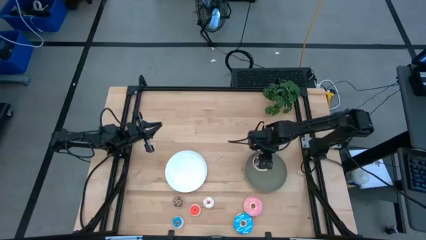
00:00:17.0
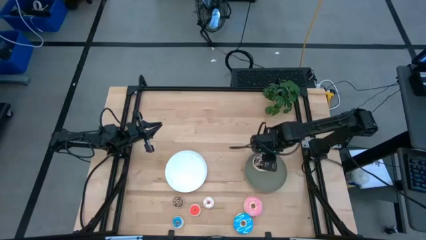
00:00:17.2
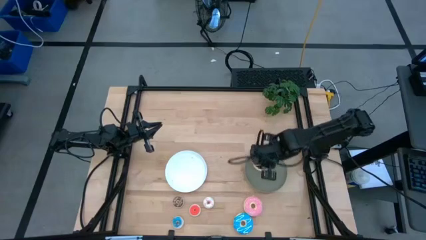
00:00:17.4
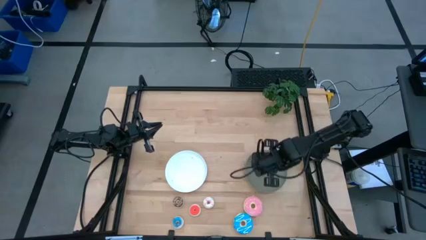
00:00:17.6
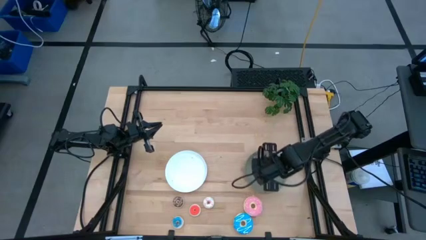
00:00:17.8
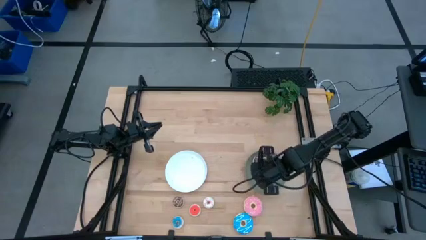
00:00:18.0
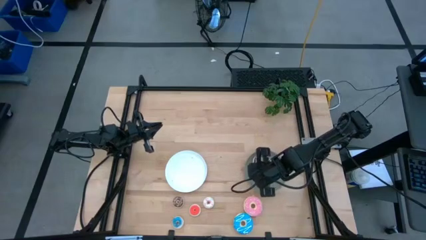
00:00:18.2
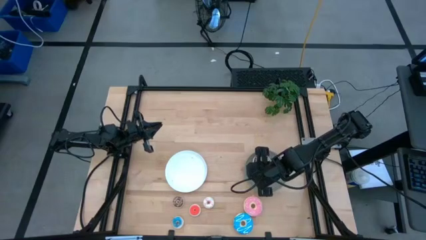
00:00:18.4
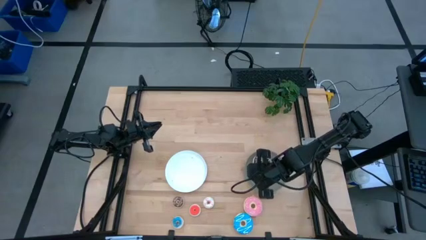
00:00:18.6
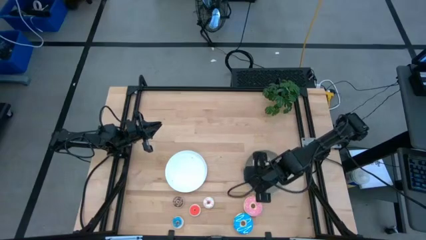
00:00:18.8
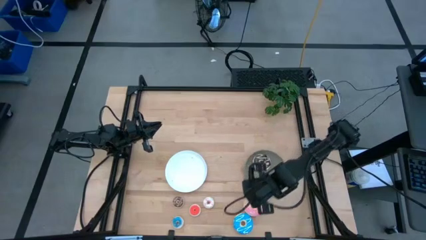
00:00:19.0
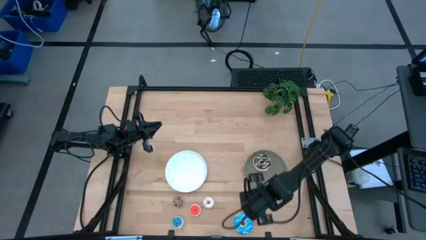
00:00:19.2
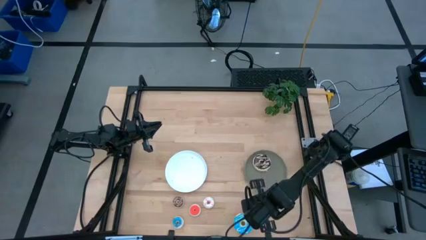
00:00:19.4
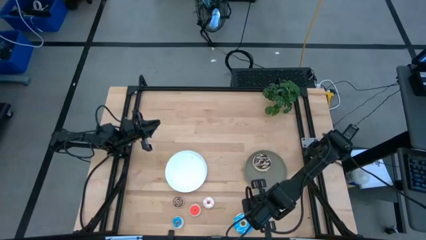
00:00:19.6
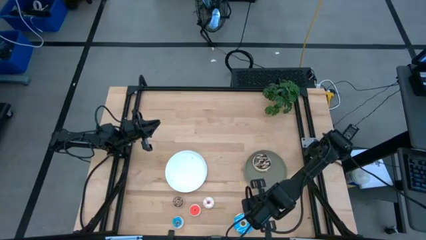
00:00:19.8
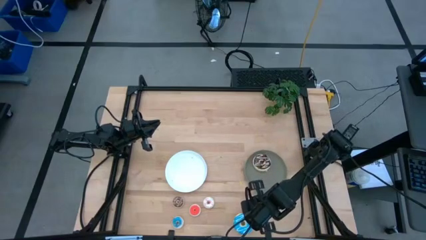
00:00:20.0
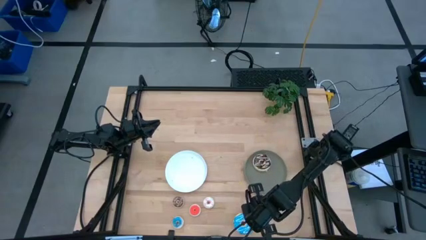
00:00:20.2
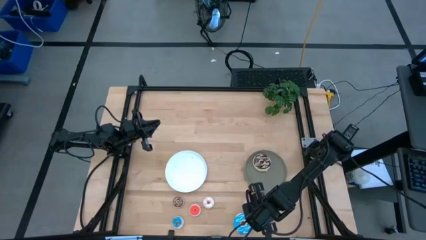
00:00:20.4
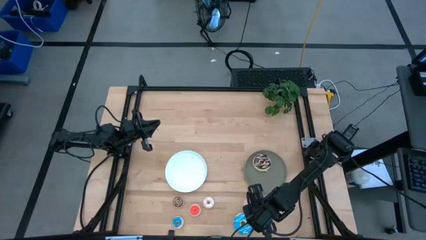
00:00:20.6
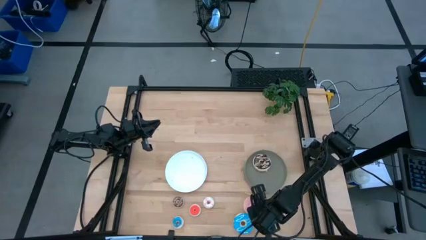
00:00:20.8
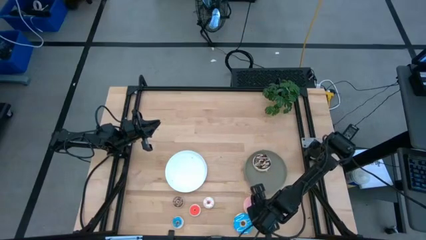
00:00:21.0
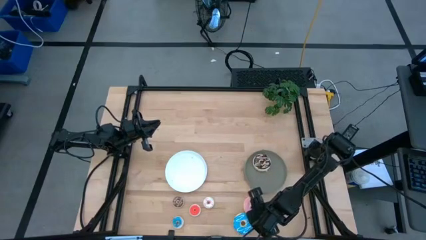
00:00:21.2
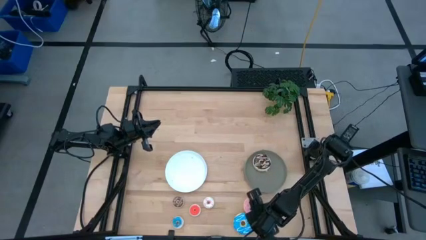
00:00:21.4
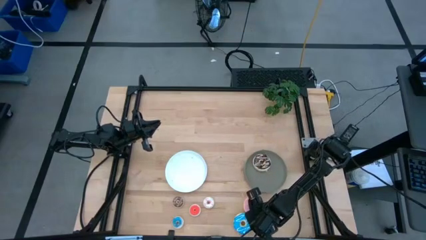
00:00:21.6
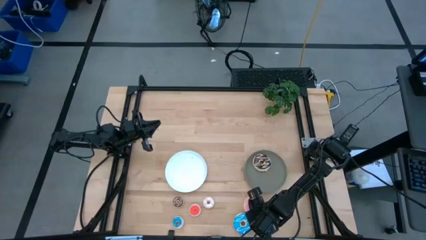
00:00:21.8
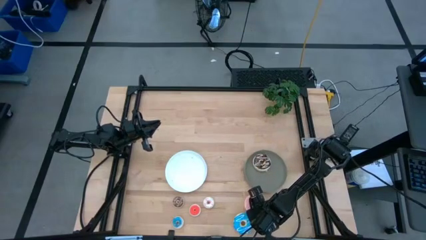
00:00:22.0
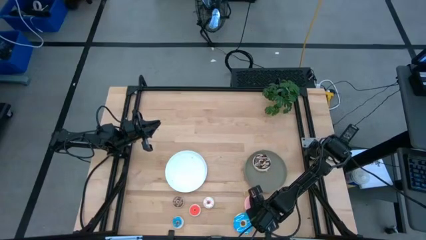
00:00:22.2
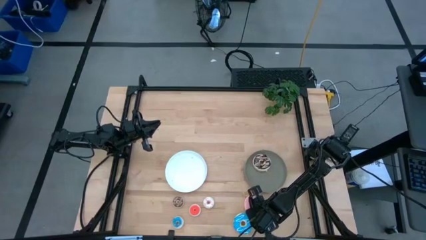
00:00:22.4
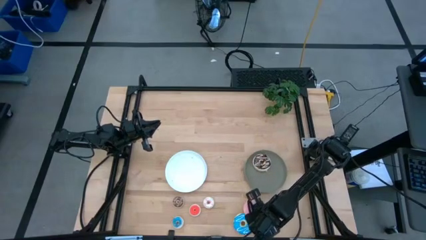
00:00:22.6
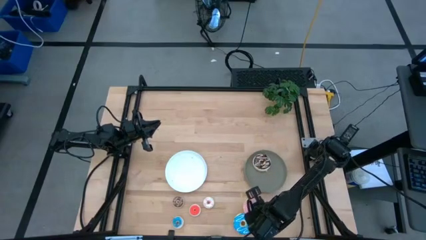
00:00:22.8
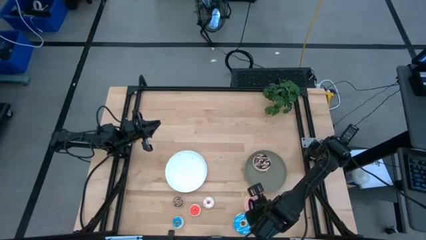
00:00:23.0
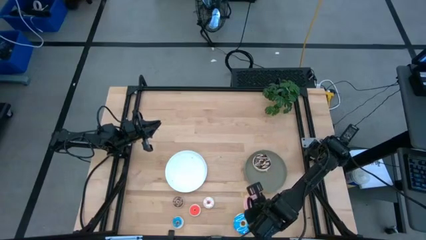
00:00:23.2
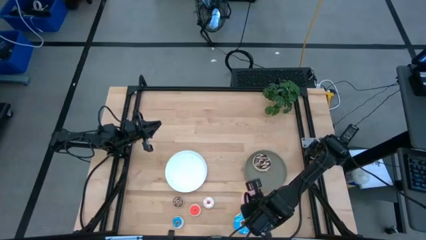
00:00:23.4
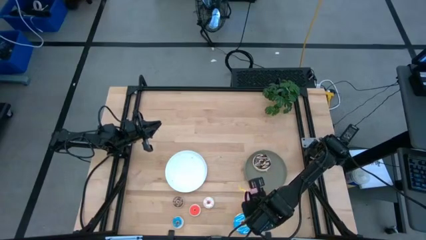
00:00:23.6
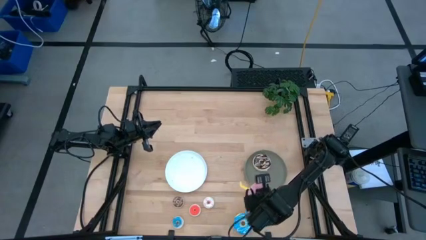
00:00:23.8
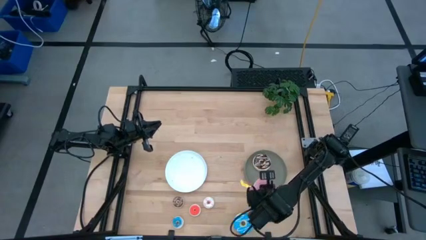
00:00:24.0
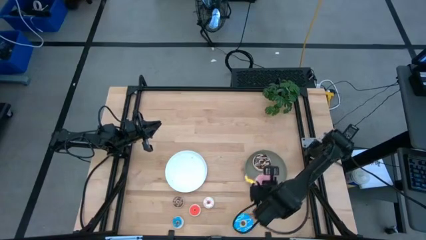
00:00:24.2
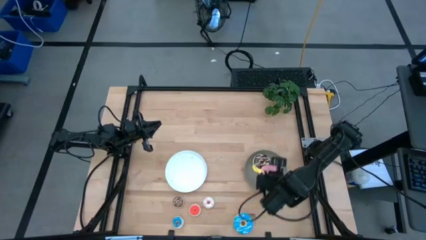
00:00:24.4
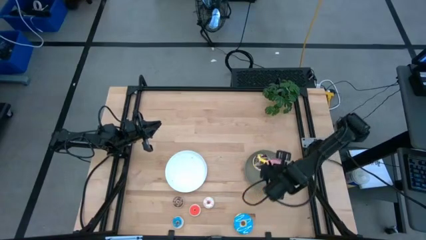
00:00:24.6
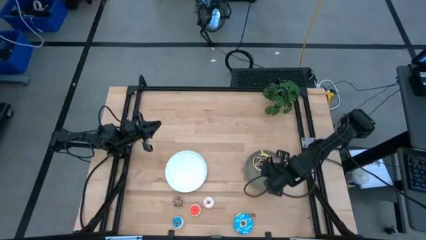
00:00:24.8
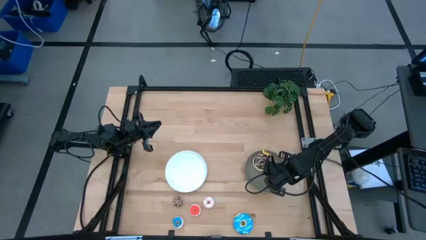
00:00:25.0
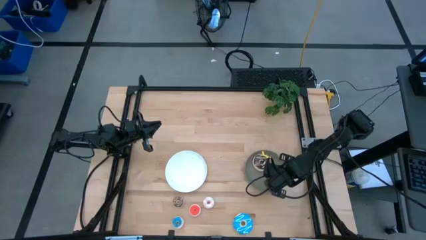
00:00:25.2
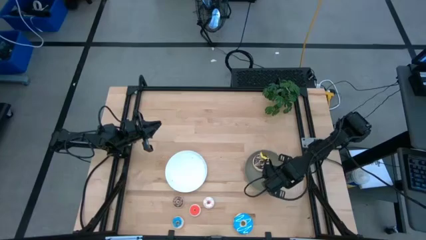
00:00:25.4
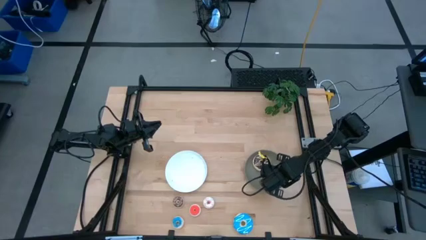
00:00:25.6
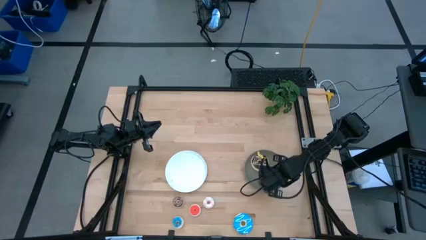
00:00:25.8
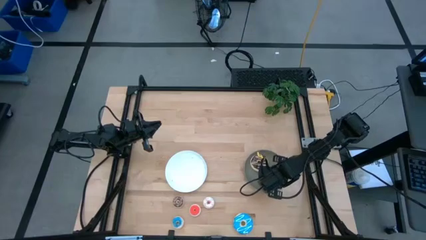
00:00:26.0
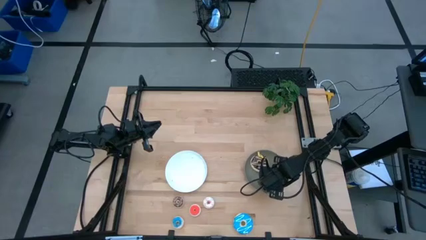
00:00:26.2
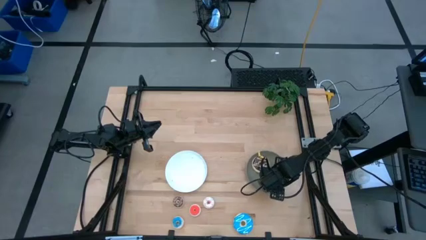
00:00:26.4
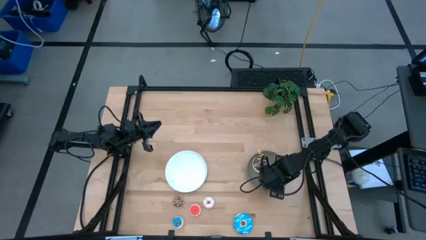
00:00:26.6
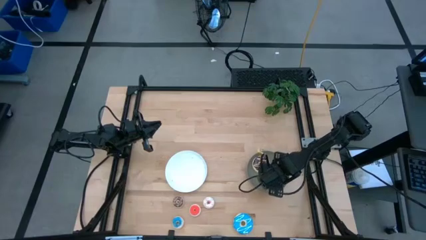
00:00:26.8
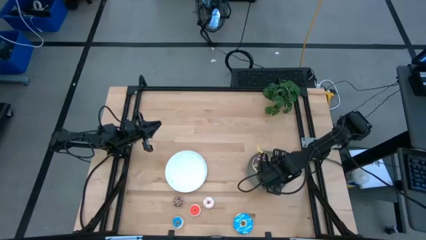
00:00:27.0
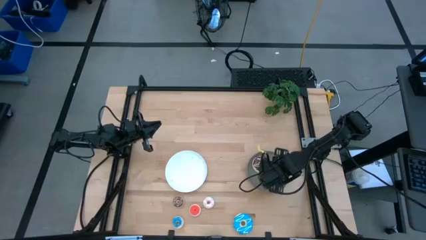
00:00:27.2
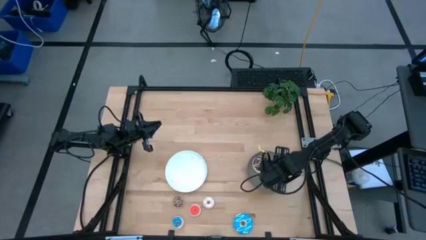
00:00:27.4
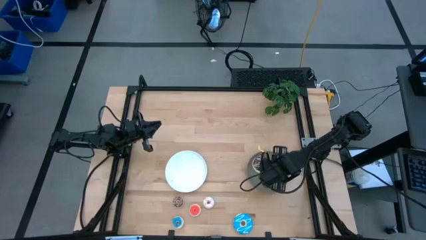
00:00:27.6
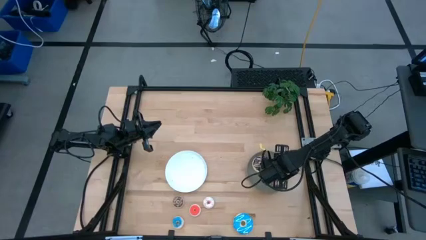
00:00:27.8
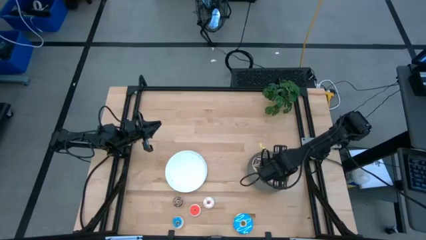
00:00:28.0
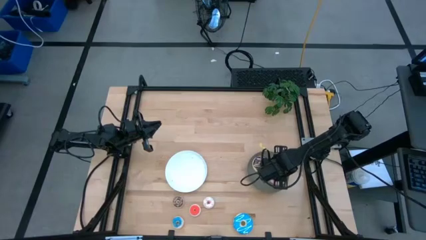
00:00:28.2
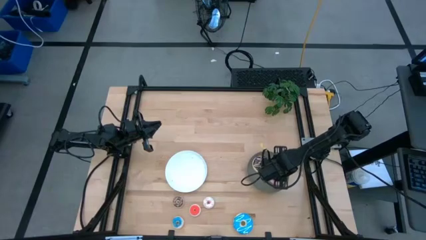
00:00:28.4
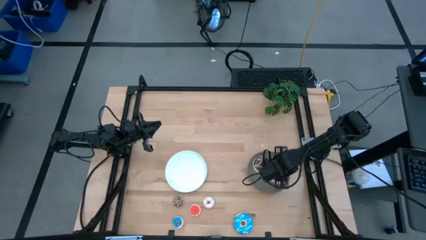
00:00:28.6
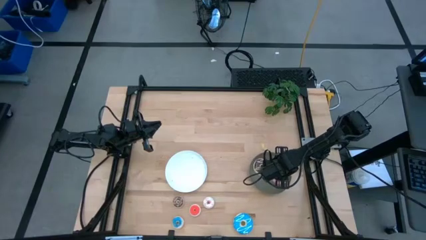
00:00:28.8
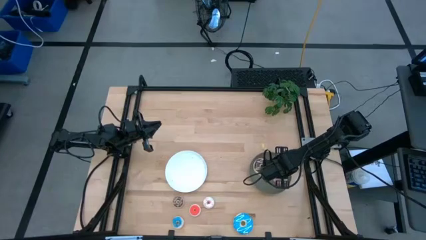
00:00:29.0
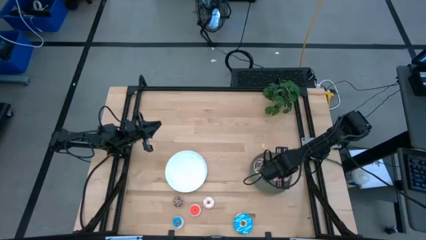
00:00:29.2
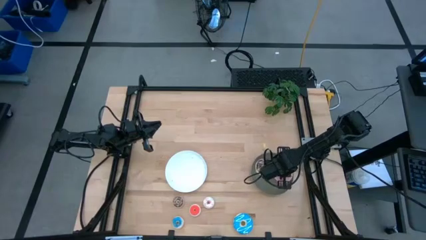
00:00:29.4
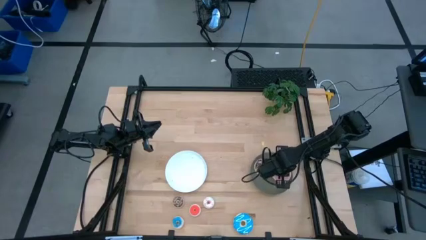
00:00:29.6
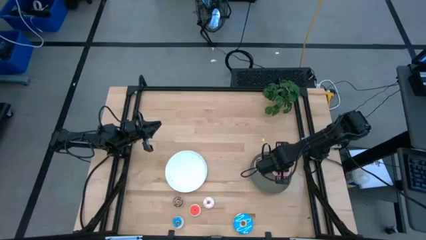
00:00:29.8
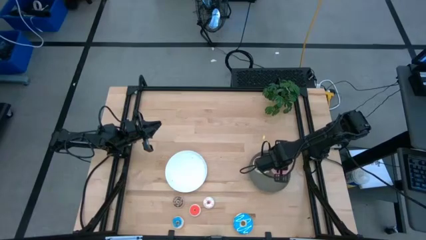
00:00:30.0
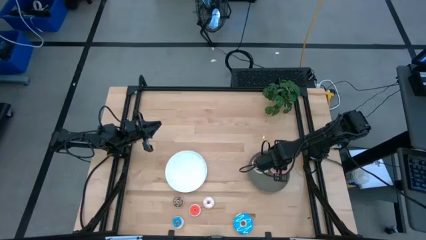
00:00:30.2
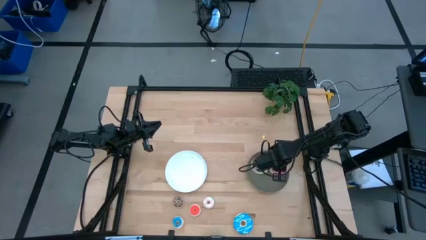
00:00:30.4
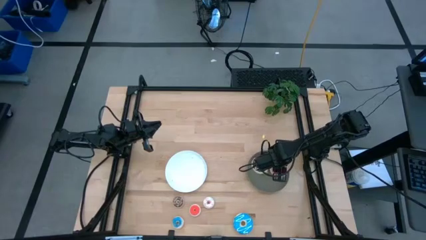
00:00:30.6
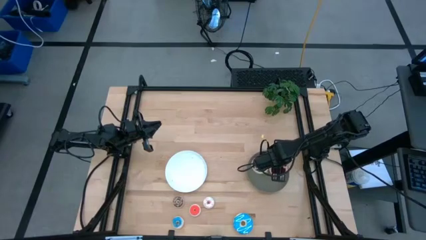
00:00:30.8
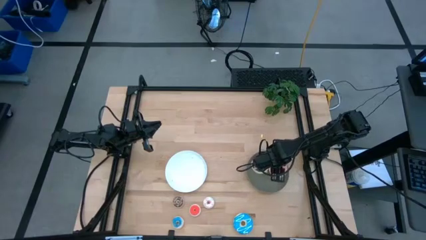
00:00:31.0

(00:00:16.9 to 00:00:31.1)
Task: Pick & Place donuts
Put the large pink donut on the gray plate

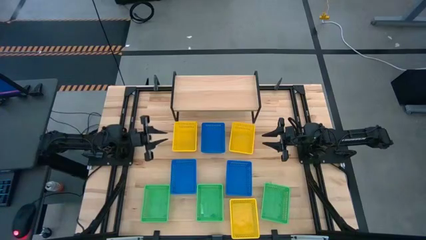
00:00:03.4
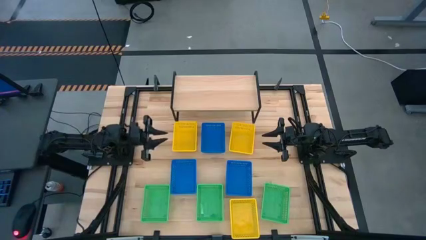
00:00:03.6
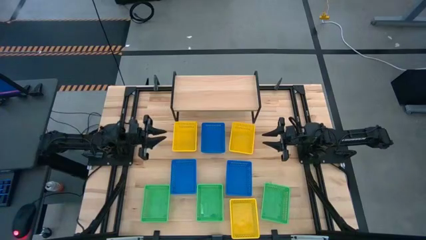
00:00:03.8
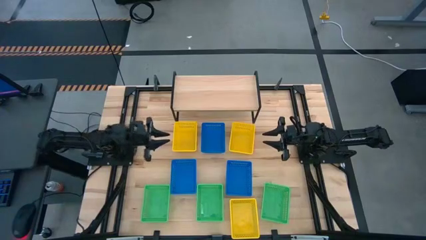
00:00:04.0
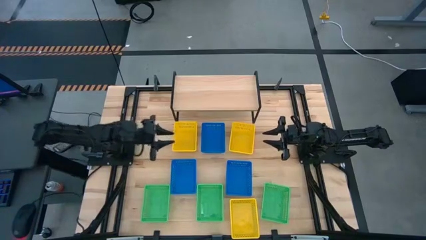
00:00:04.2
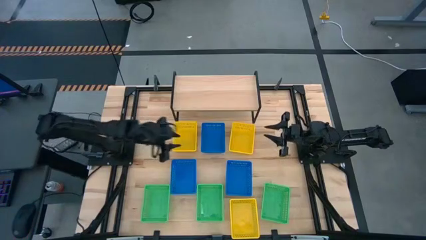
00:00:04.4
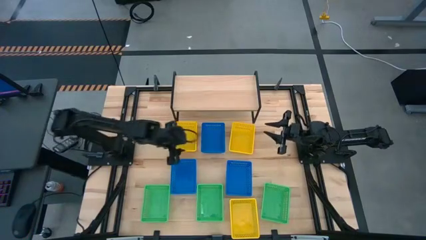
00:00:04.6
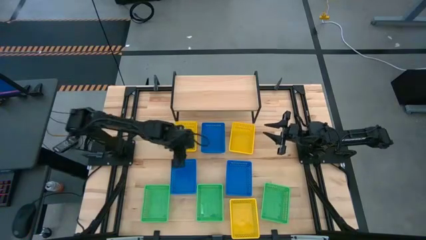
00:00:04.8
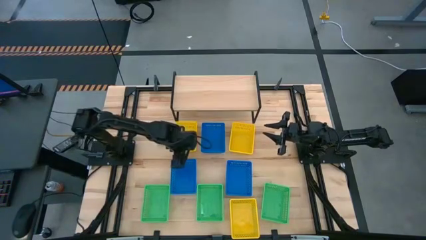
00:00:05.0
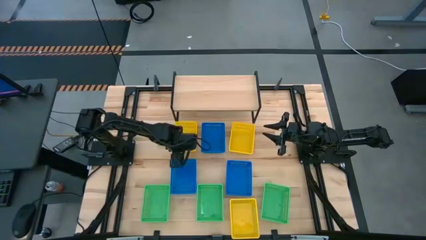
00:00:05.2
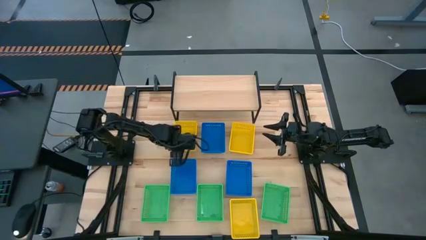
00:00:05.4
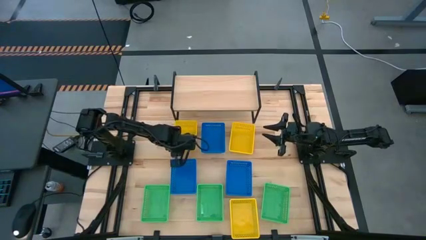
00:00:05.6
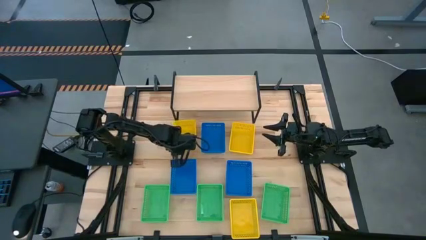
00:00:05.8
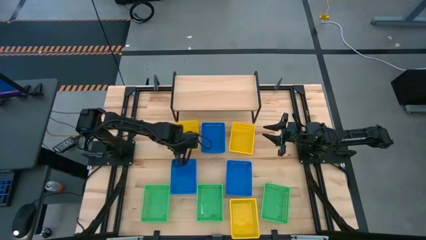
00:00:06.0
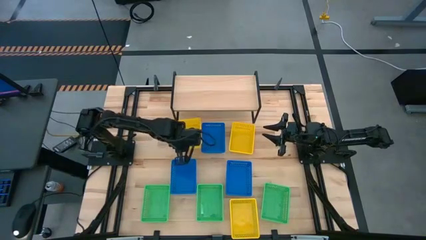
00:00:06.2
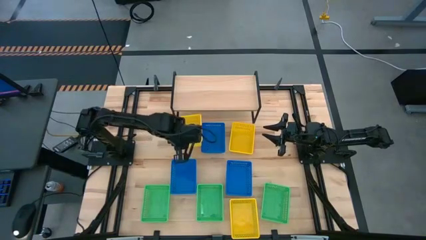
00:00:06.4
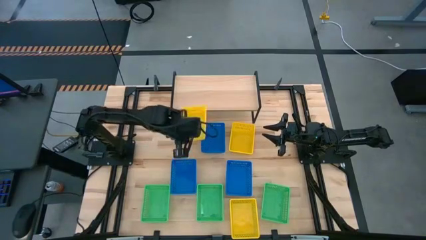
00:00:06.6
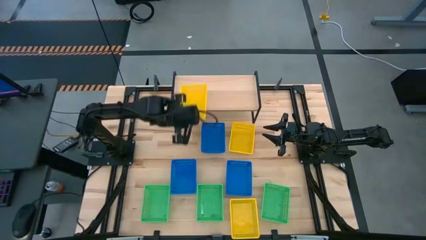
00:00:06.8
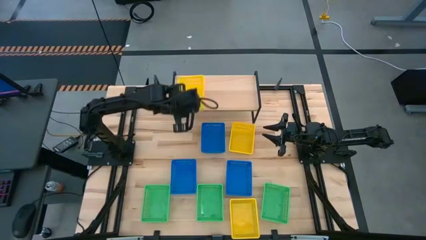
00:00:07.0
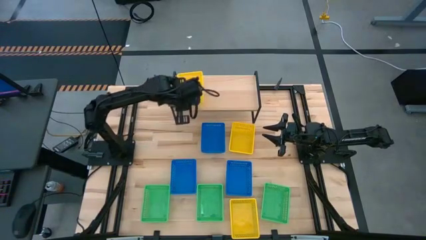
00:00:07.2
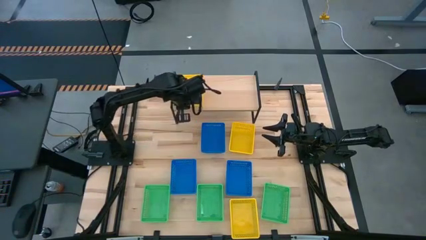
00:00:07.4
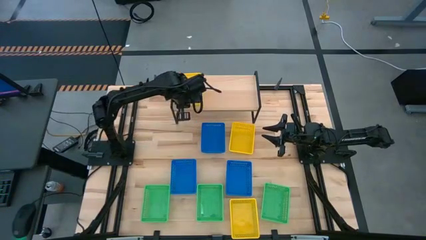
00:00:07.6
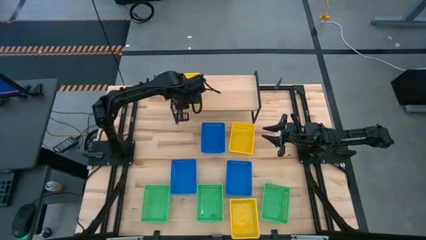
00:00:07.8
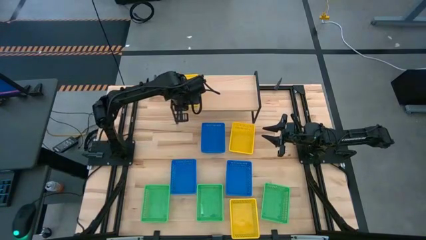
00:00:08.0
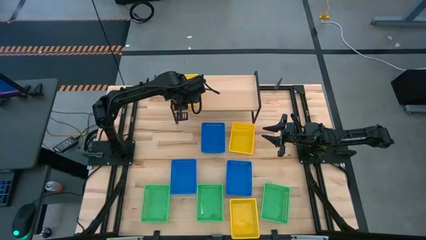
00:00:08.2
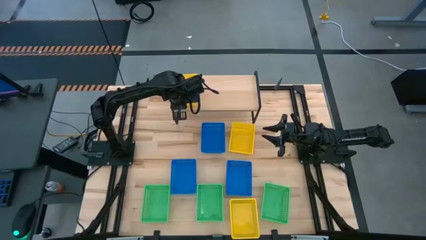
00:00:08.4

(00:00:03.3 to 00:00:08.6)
Task: Stack baskets on shelf by color
Put the top left yellow basket on the shelf
